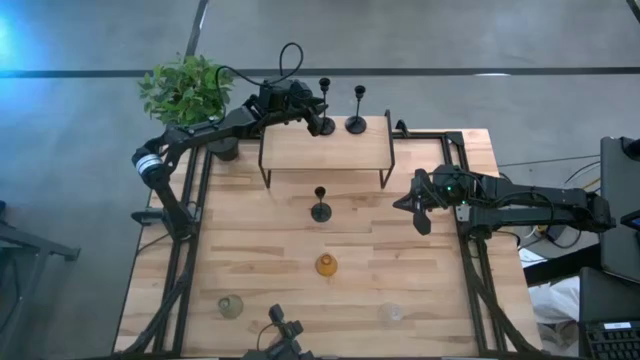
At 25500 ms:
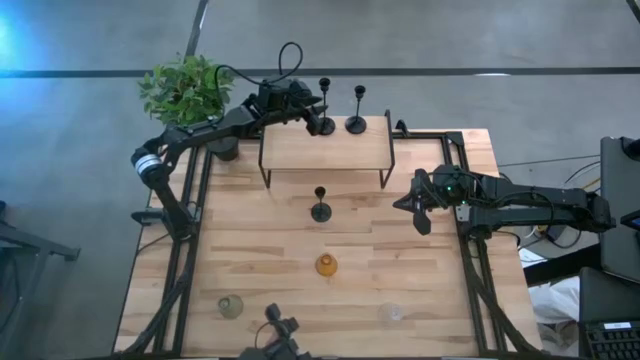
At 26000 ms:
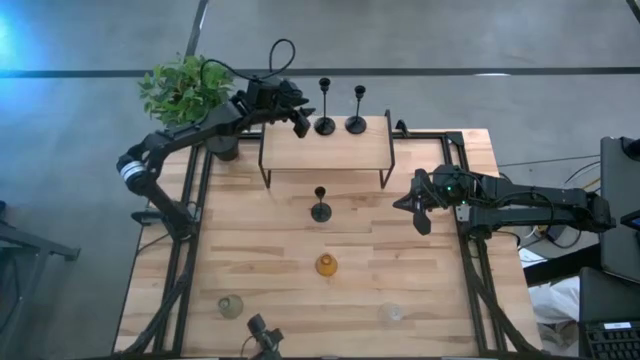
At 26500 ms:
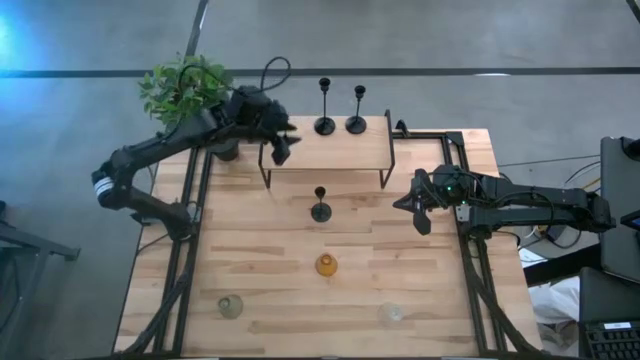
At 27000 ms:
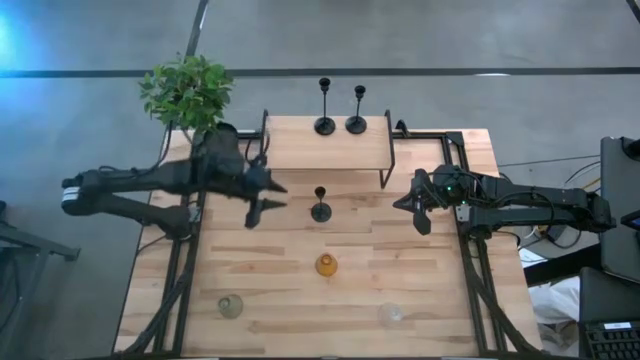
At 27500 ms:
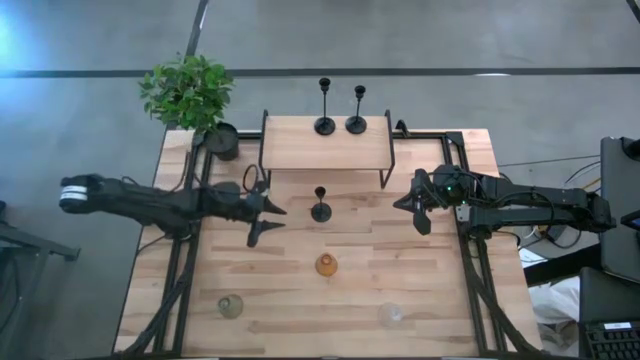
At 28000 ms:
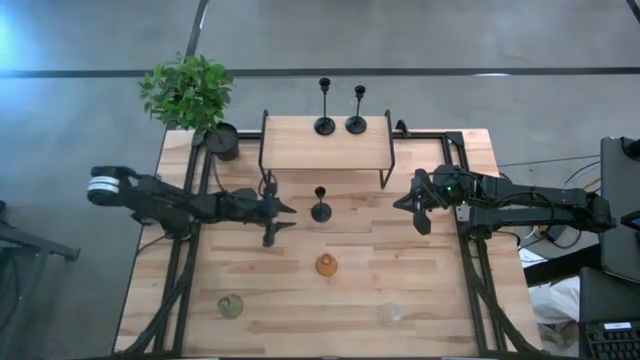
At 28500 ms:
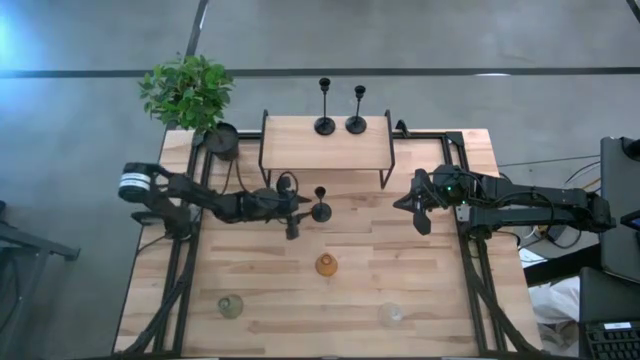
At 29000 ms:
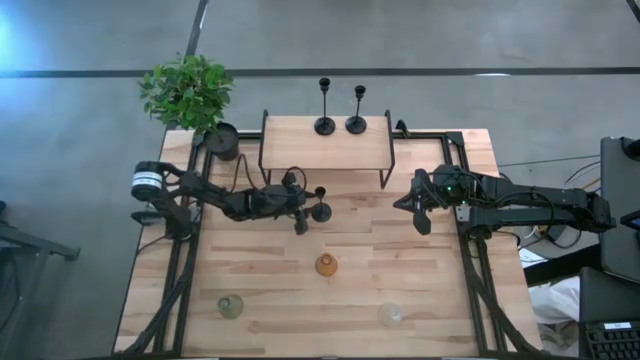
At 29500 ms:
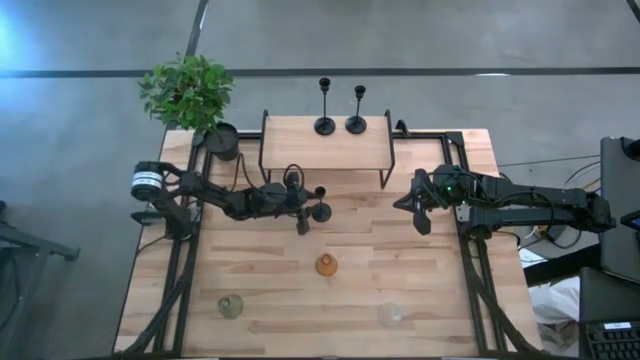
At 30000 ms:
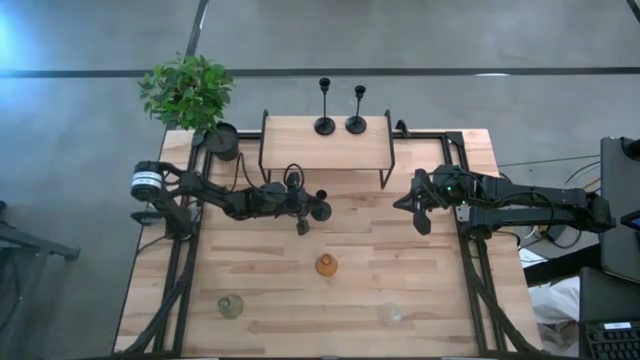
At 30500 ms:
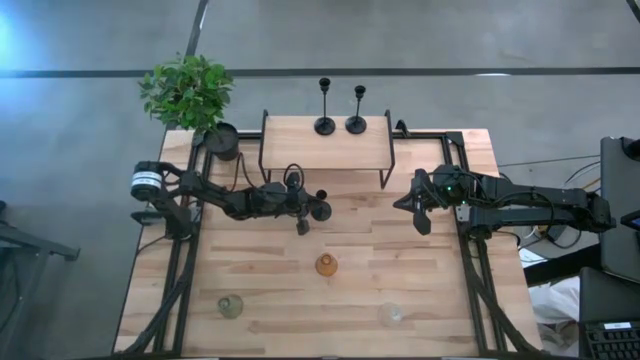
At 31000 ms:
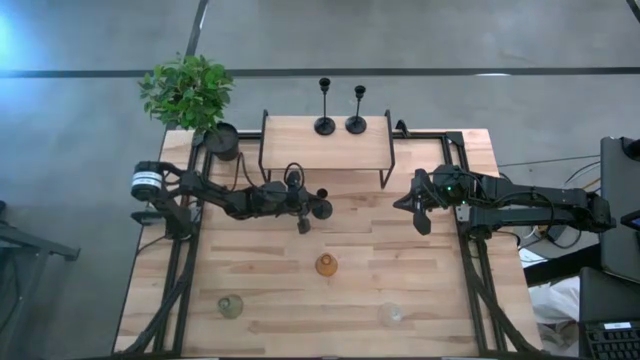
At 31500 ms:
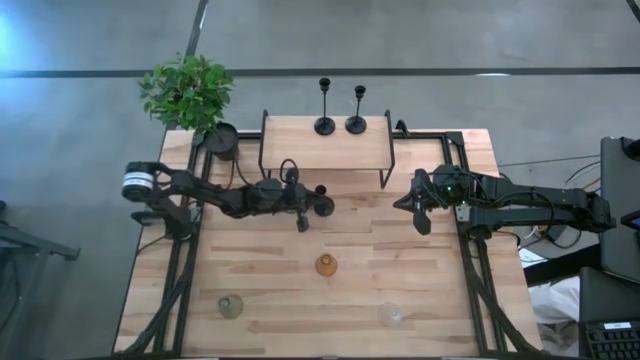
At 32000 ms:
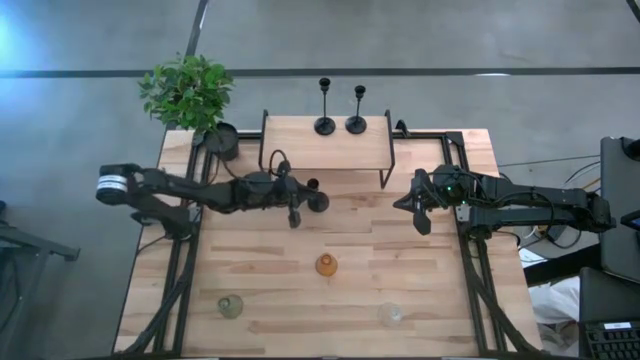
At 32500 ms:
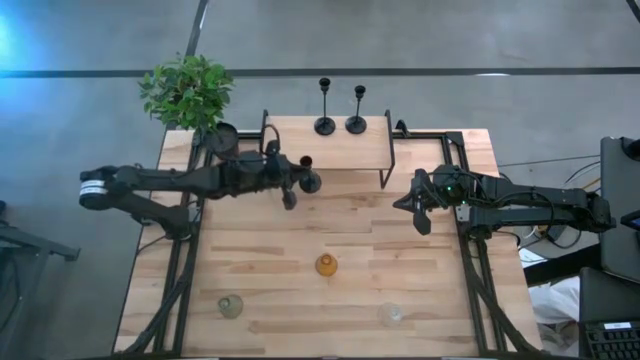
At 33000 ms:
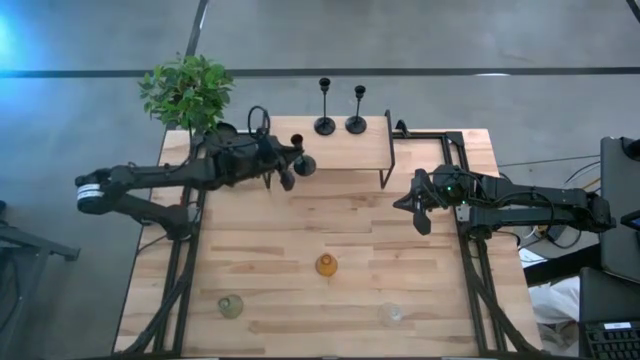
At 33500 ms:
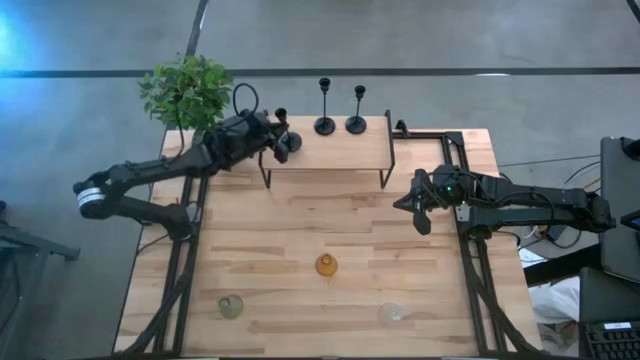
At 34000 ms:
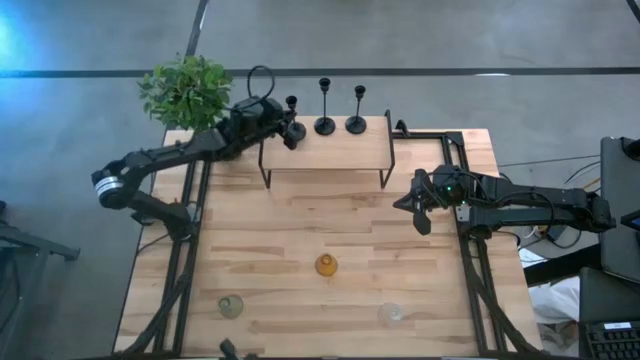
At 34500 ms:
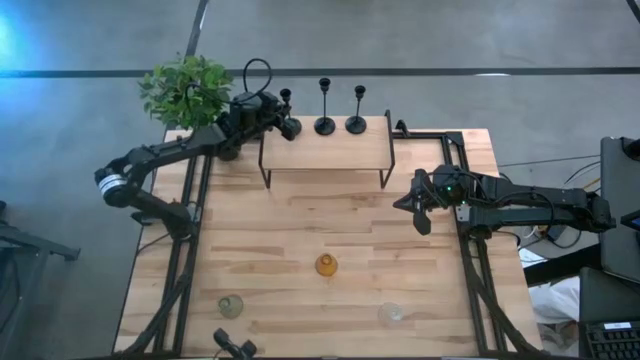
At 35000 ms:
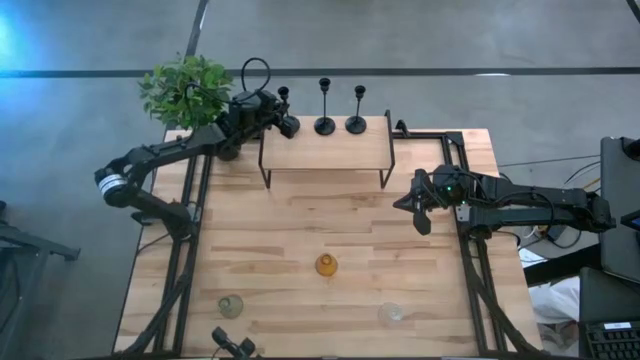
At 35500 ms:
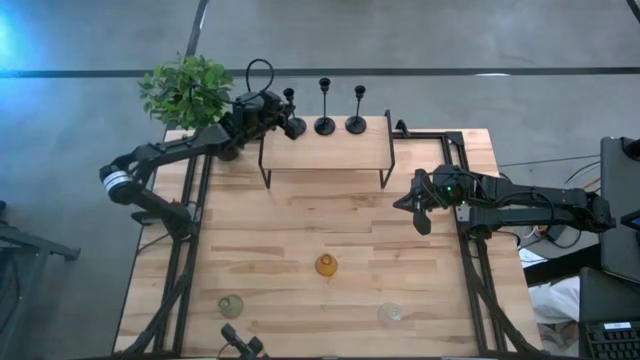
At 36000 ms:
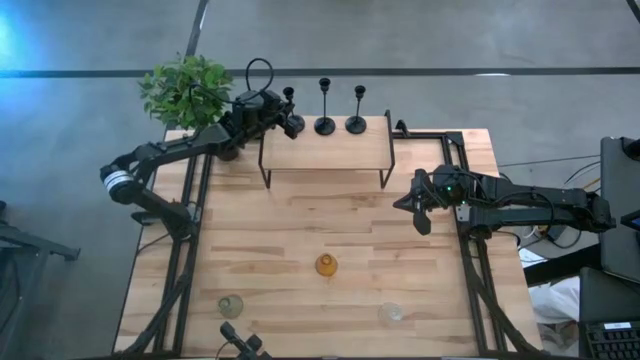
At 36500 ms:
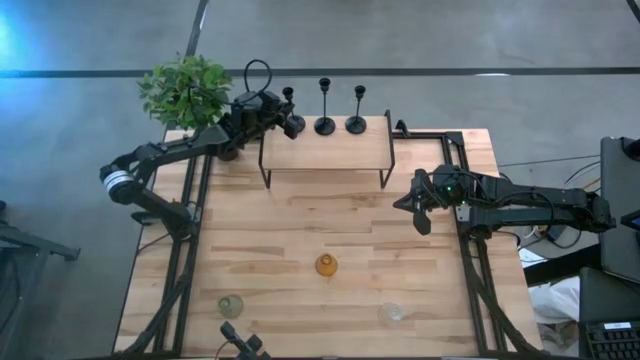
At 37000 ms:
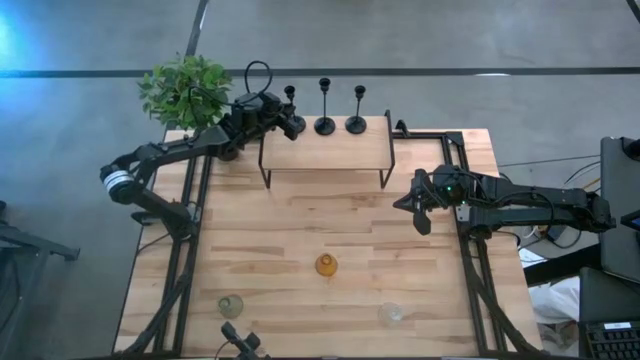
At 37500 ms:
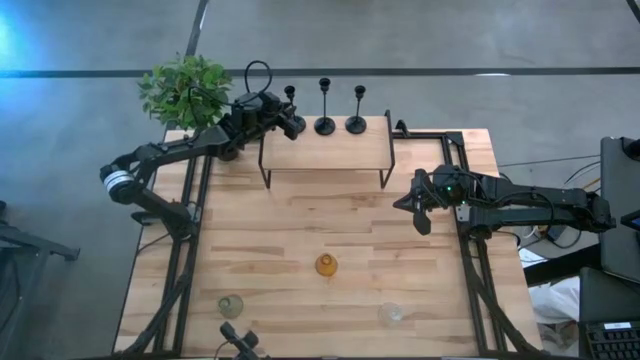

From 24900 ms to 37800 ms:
Task: Pick & Place candle stick holders
Put the black candle holder on the shelf

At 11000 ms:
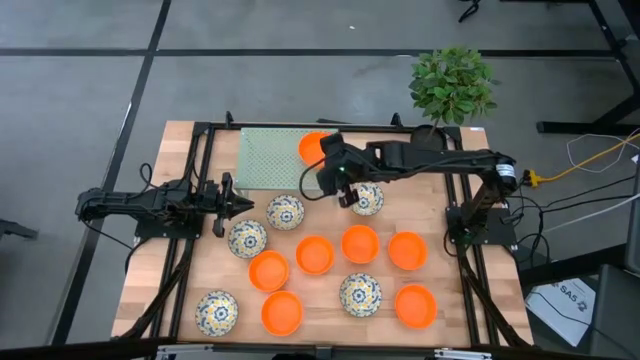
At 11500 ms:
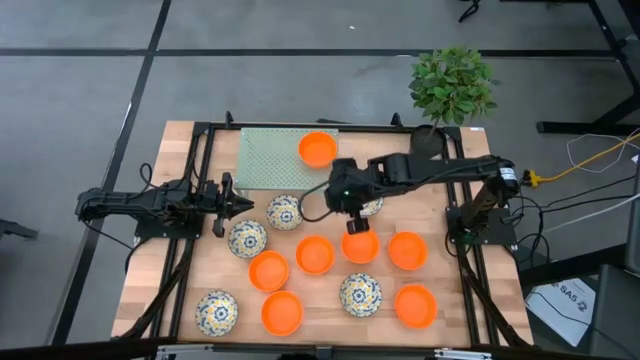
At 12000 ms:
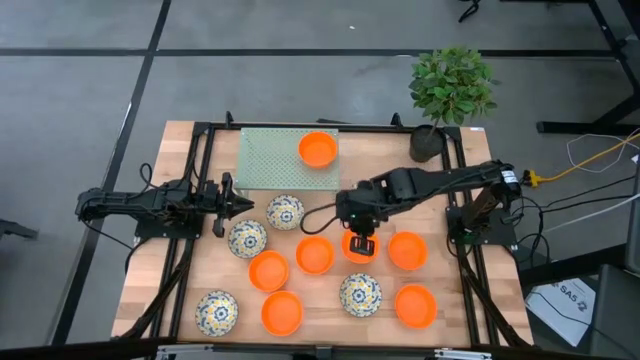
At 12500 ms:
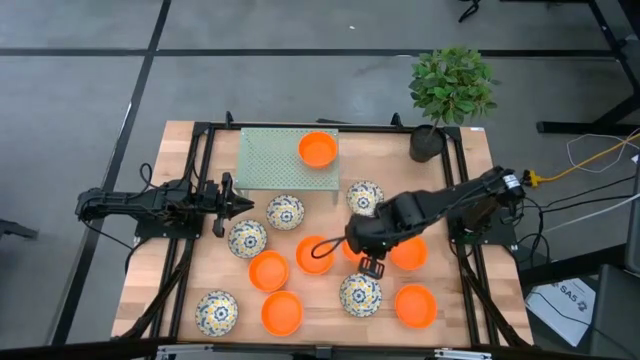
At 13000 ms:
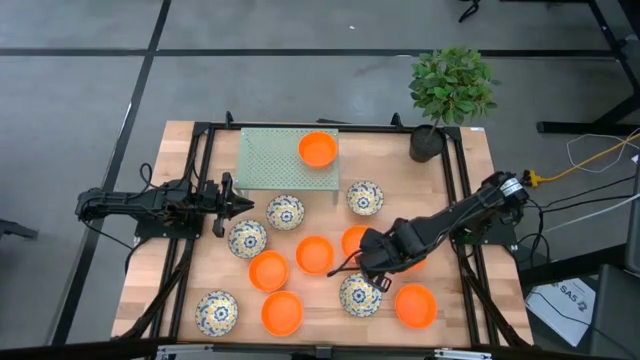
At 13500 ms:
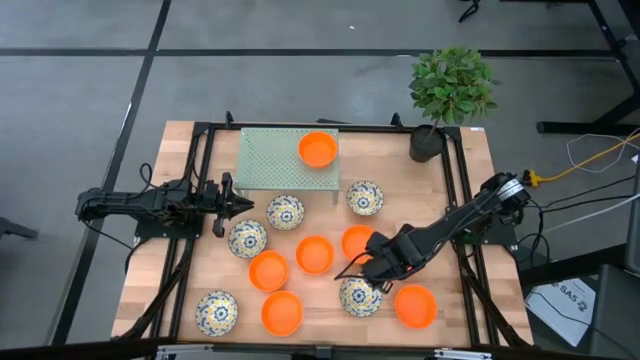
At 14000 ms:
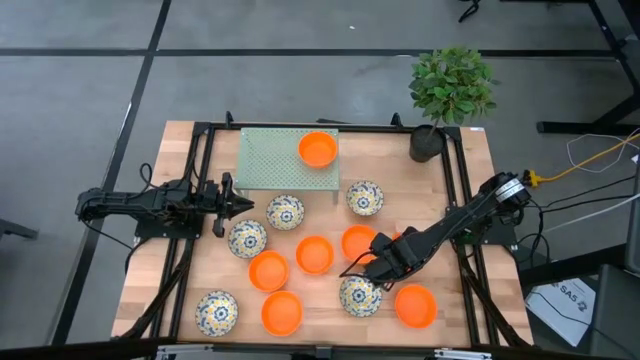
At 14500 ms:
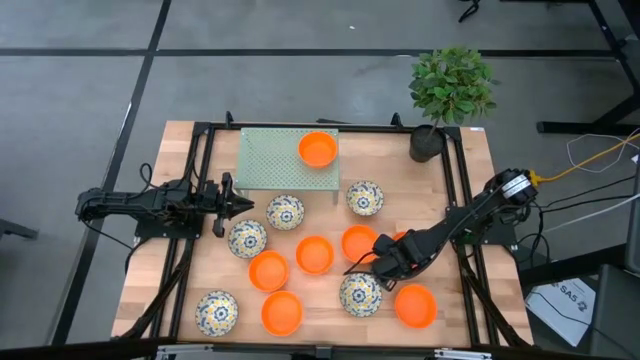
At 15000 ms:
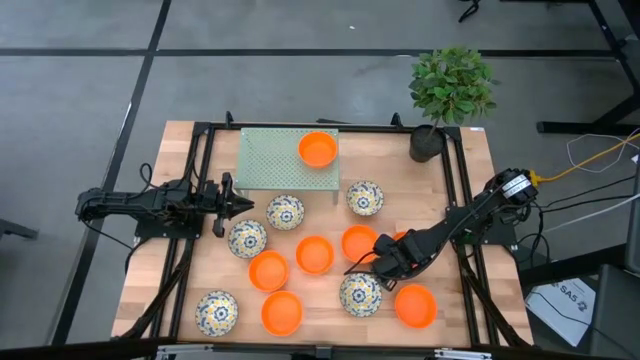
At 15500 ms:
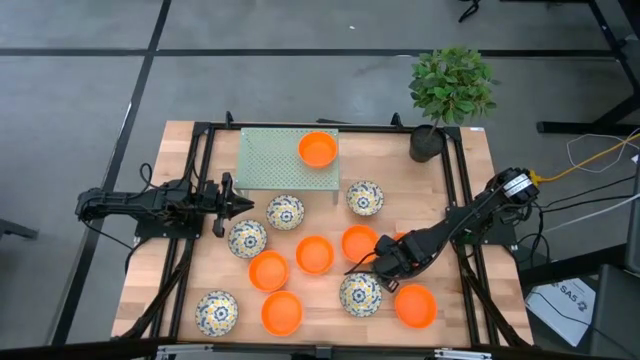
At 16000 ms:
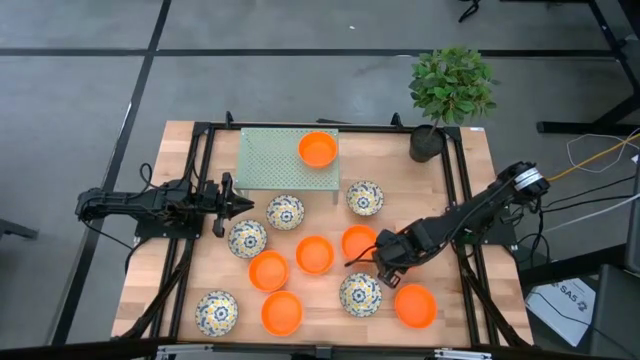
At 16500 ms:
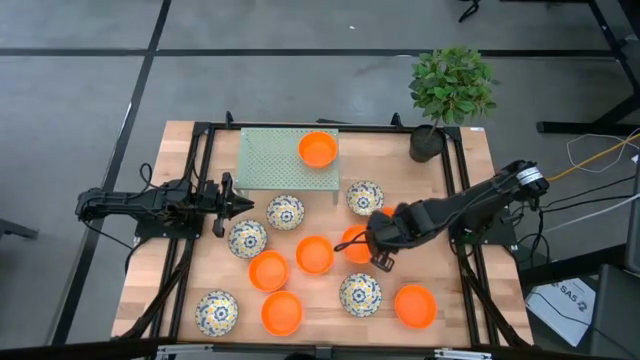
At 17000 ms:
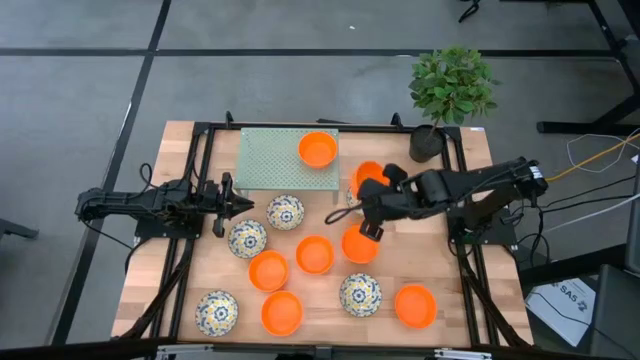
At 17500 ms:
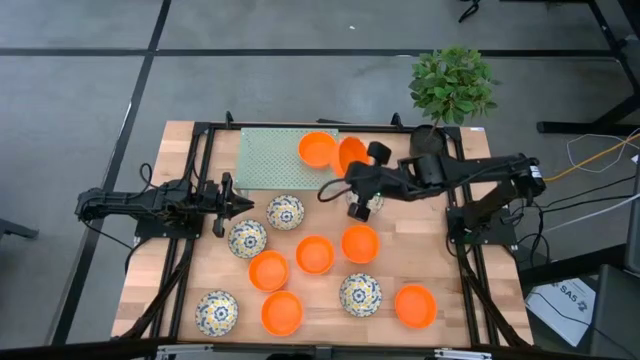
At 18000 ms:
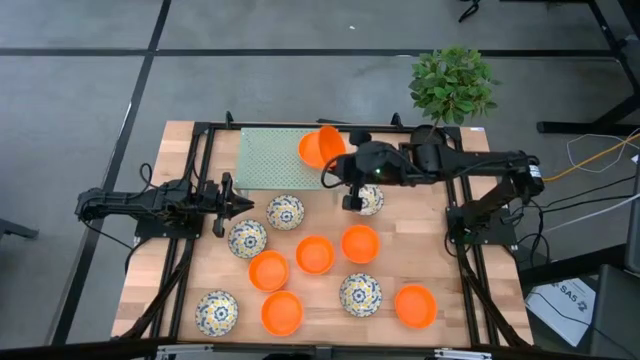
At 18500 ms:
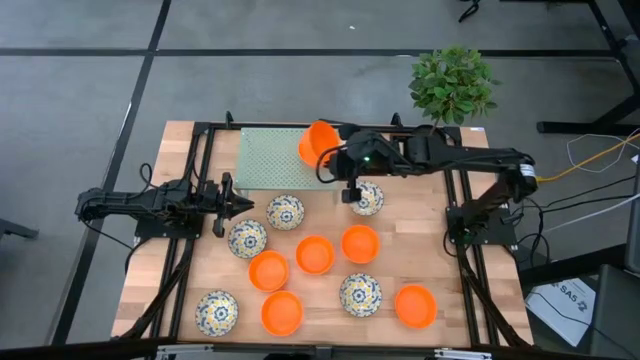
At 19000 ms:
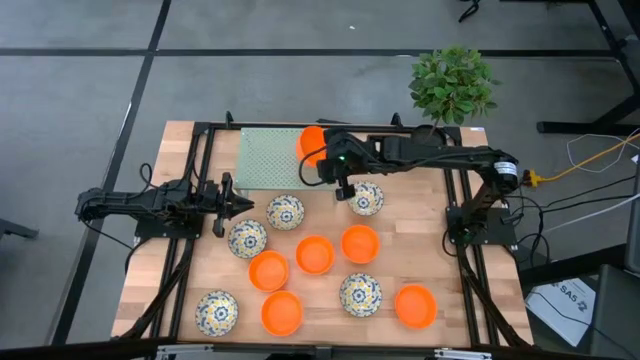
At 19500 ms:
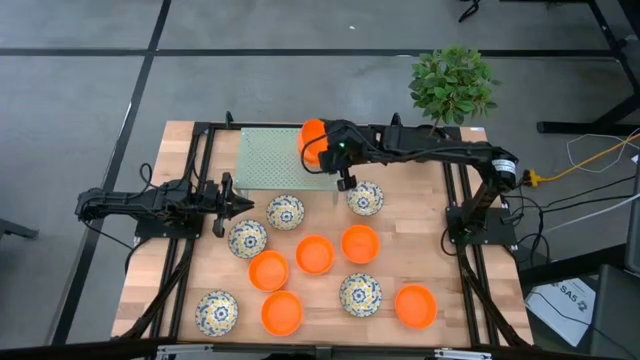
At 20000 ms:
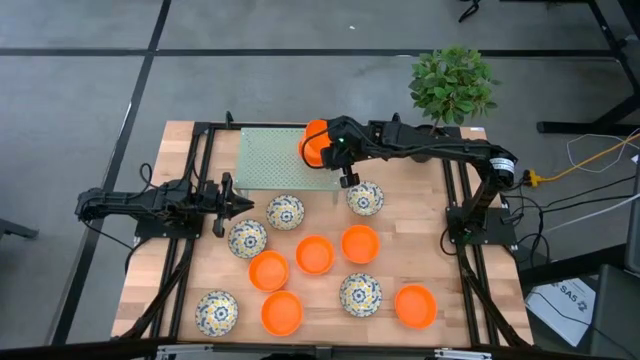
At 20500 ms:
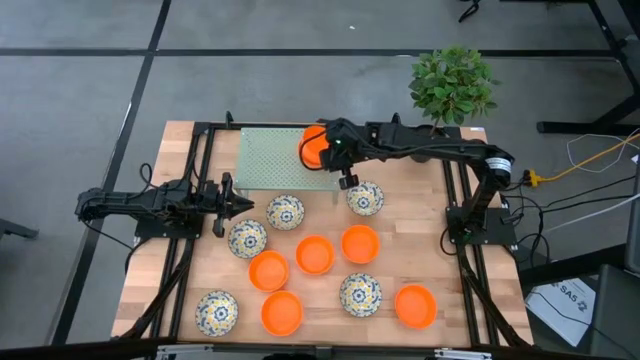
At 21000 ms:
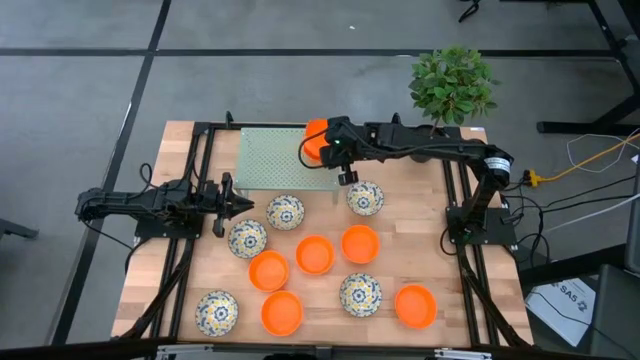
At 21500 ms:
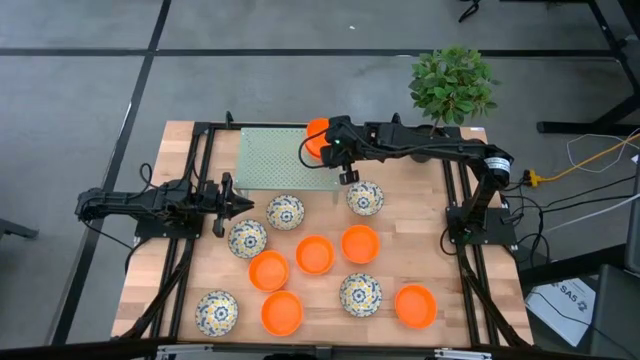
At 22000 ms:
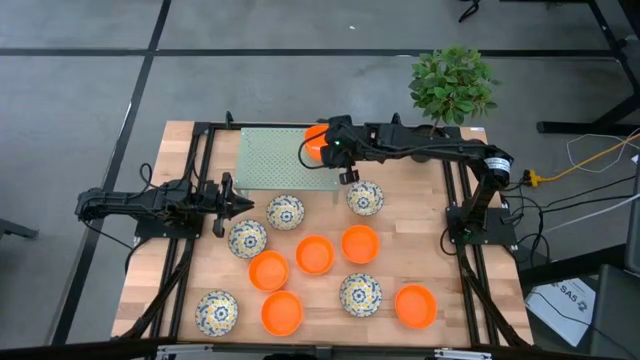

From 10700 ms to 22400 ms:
Task: Pick & Place Mini bowls
Stack the orange bowl on top of the orange bowl on the shelf
